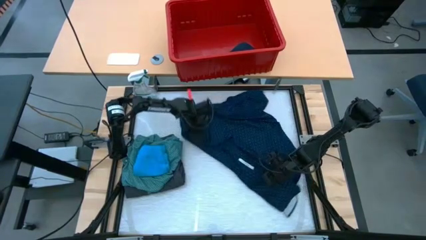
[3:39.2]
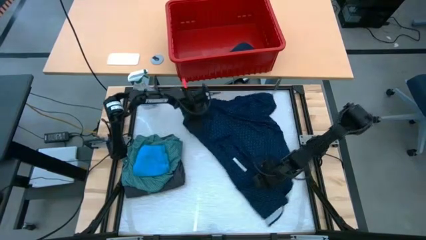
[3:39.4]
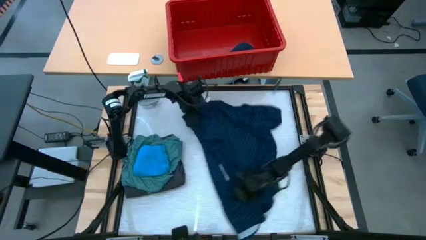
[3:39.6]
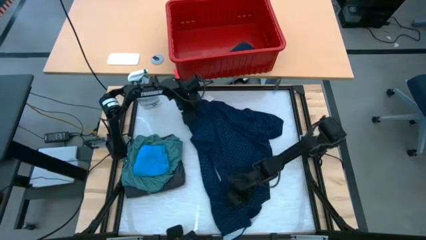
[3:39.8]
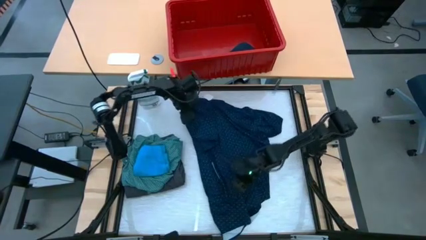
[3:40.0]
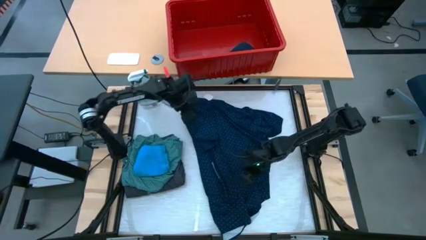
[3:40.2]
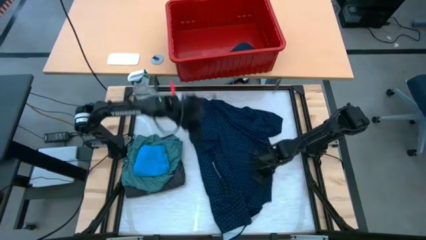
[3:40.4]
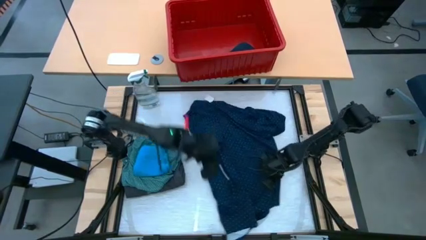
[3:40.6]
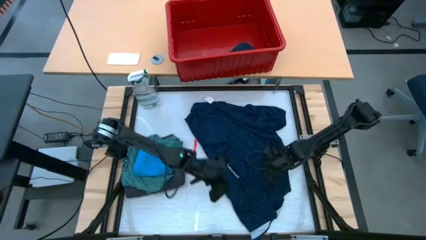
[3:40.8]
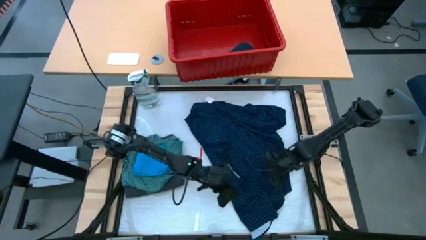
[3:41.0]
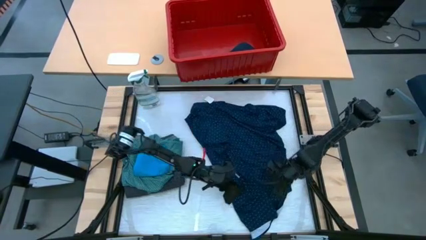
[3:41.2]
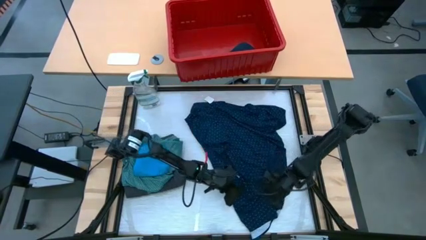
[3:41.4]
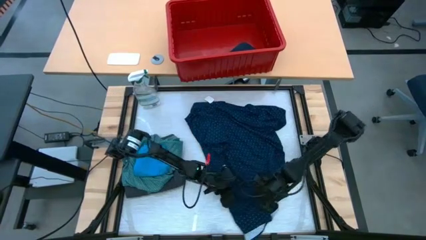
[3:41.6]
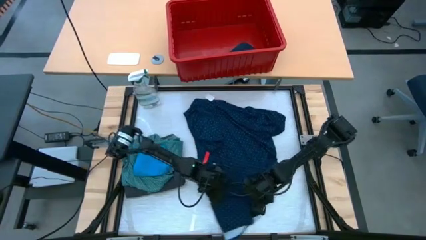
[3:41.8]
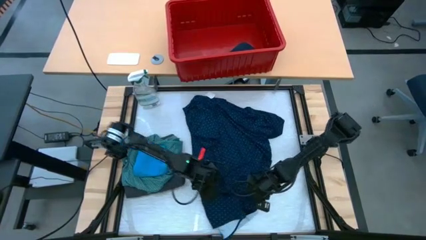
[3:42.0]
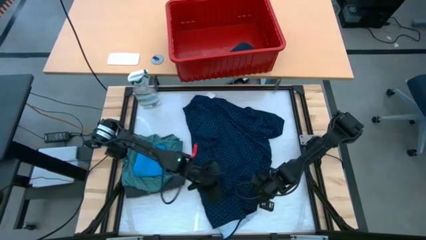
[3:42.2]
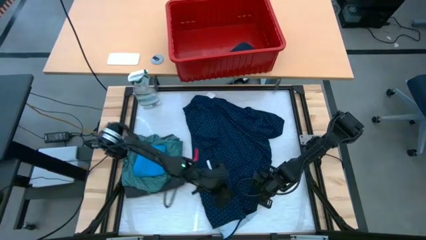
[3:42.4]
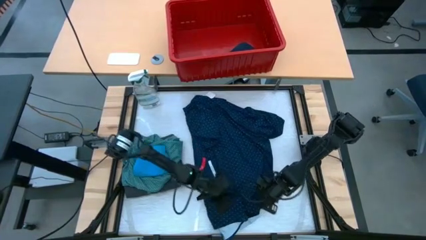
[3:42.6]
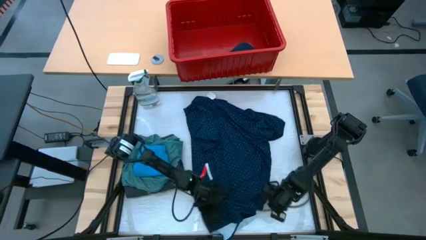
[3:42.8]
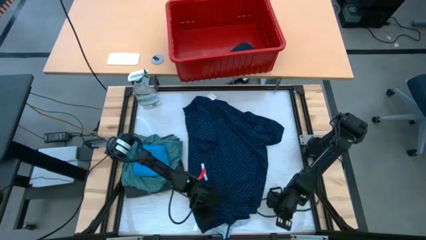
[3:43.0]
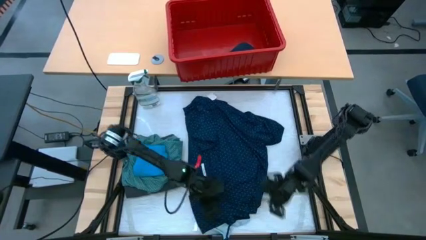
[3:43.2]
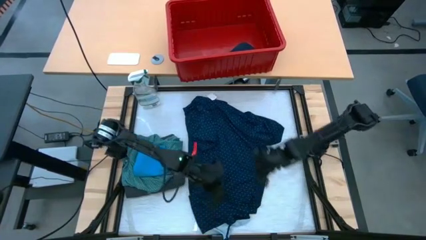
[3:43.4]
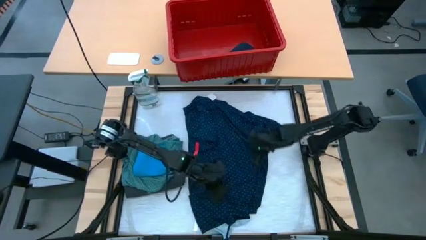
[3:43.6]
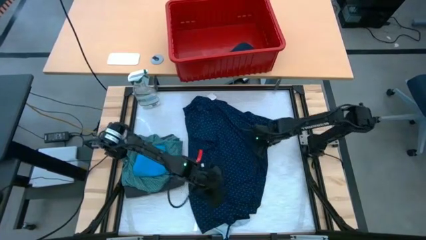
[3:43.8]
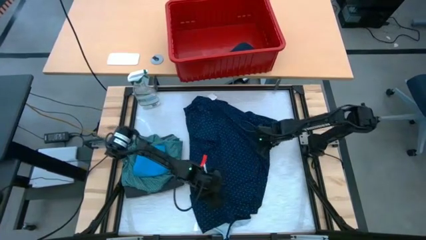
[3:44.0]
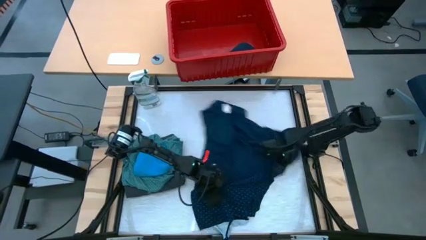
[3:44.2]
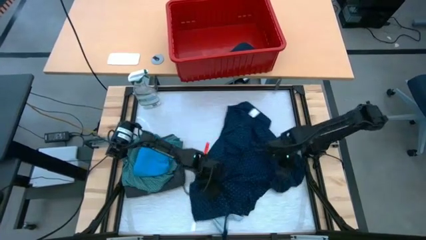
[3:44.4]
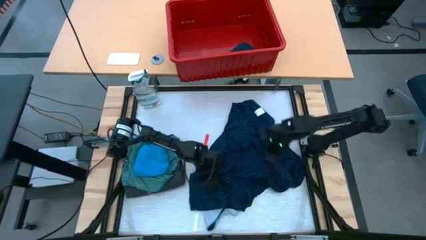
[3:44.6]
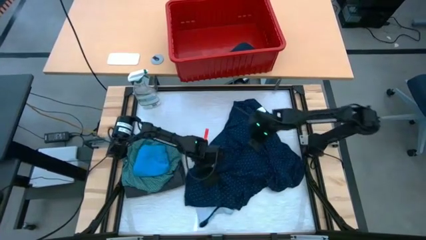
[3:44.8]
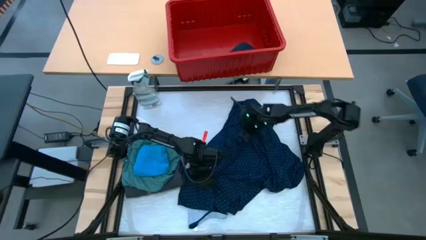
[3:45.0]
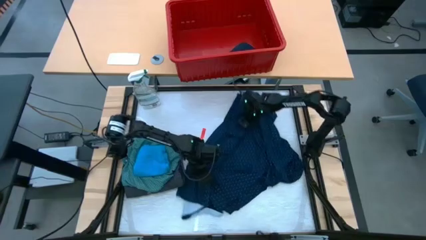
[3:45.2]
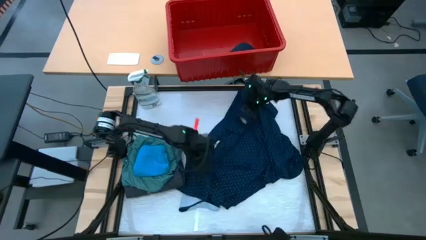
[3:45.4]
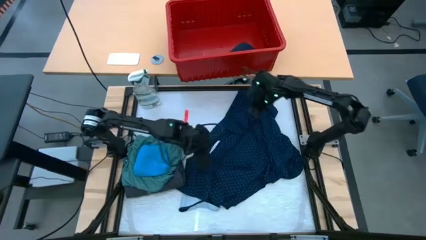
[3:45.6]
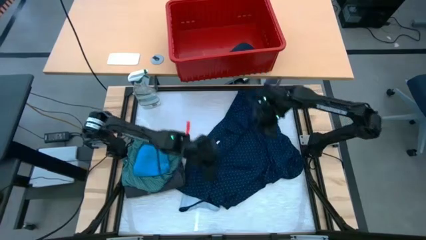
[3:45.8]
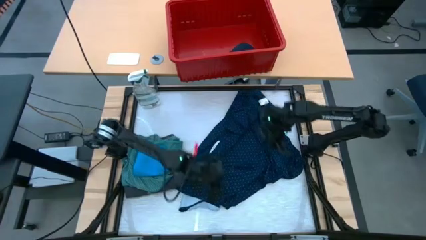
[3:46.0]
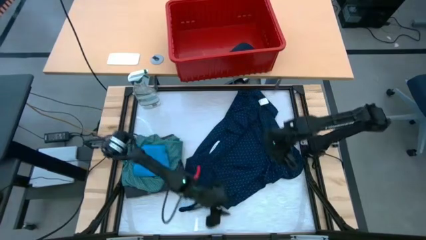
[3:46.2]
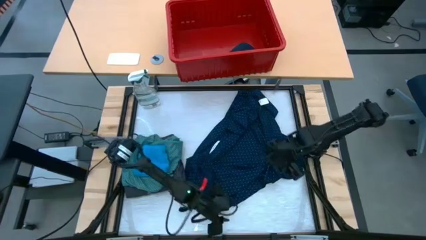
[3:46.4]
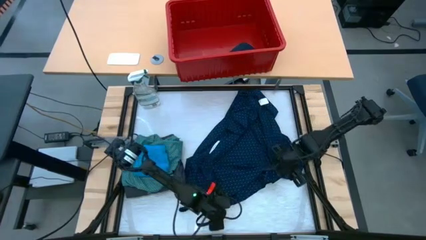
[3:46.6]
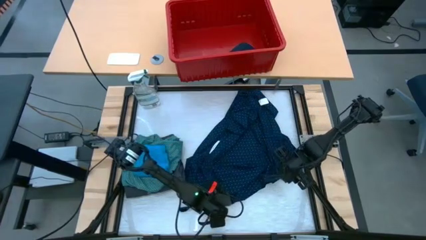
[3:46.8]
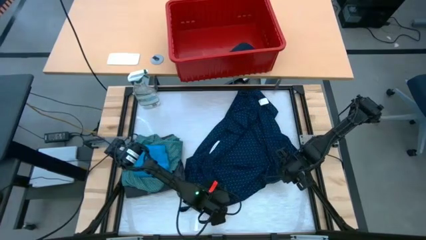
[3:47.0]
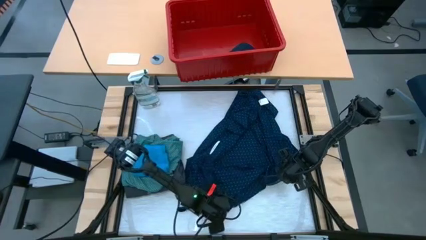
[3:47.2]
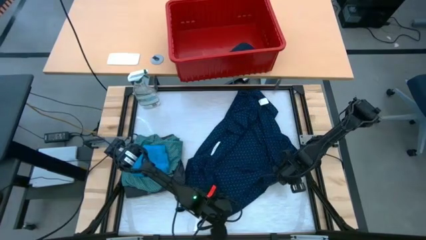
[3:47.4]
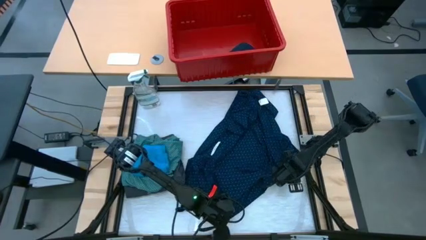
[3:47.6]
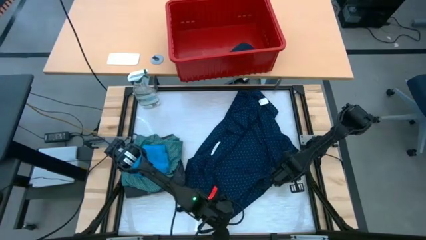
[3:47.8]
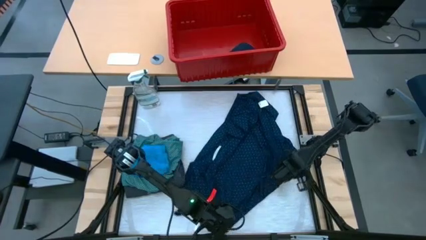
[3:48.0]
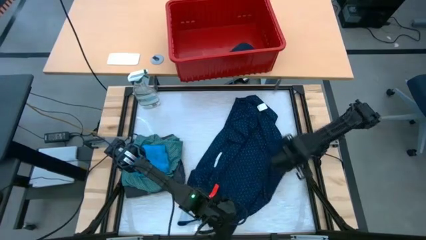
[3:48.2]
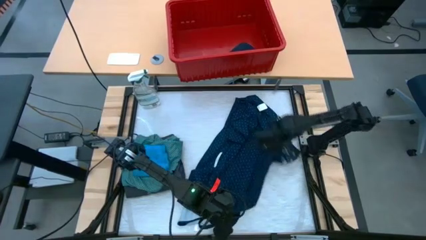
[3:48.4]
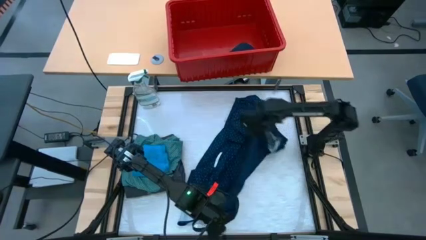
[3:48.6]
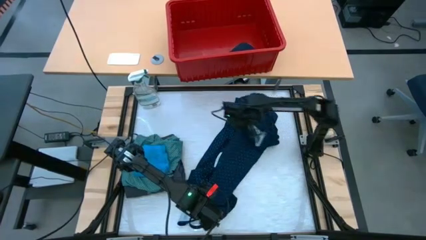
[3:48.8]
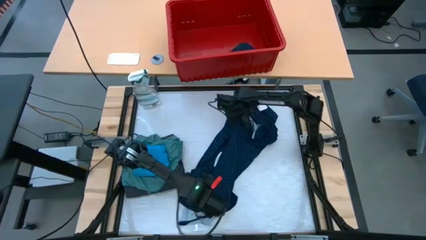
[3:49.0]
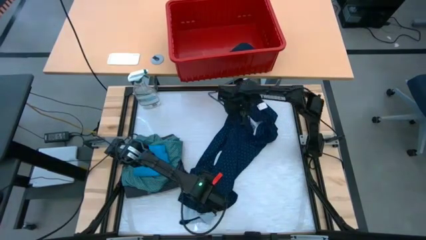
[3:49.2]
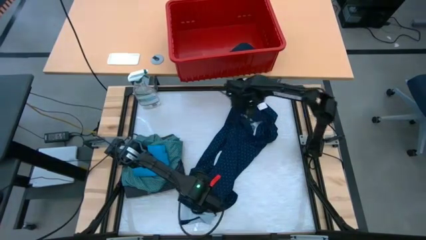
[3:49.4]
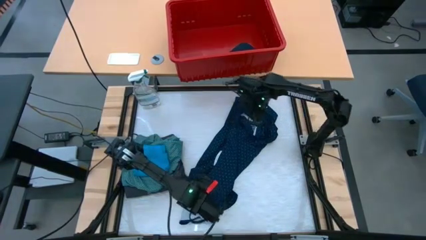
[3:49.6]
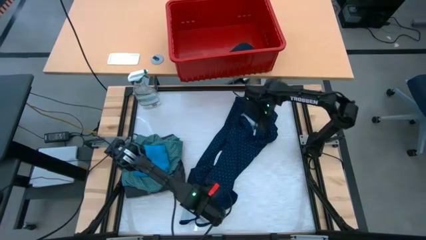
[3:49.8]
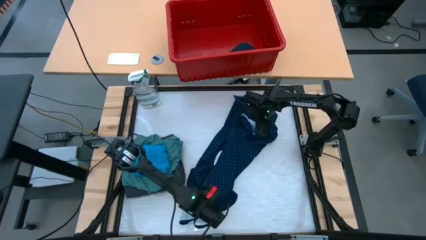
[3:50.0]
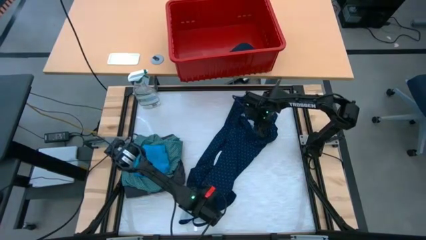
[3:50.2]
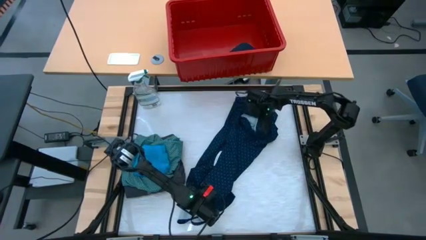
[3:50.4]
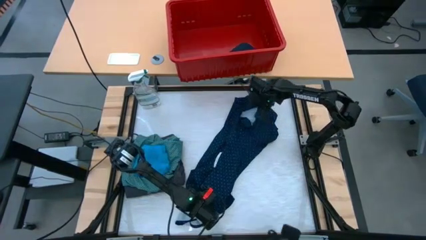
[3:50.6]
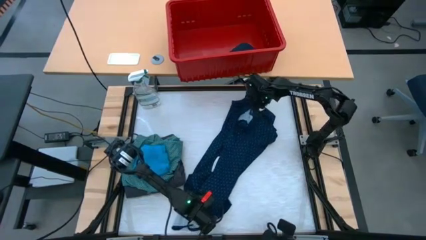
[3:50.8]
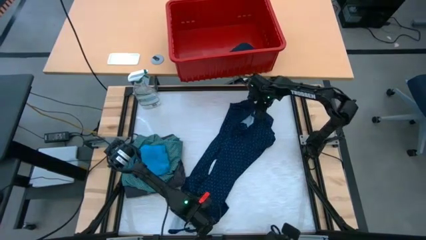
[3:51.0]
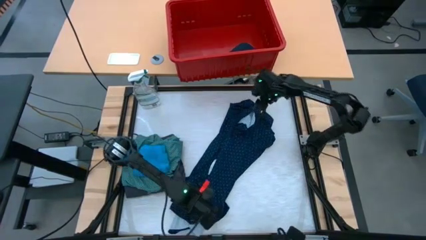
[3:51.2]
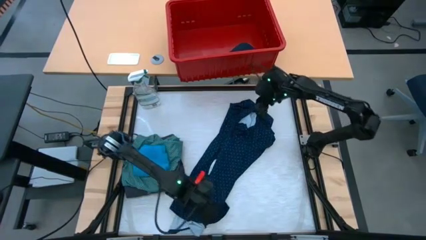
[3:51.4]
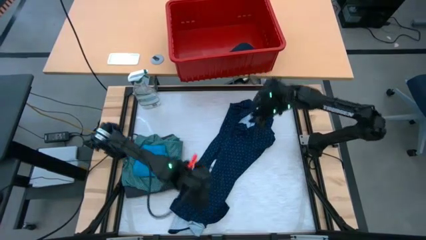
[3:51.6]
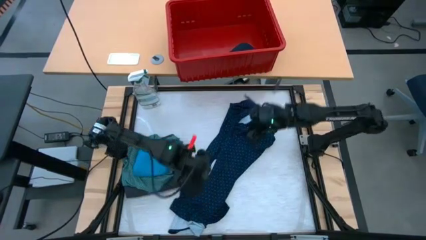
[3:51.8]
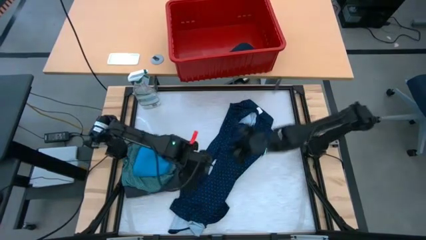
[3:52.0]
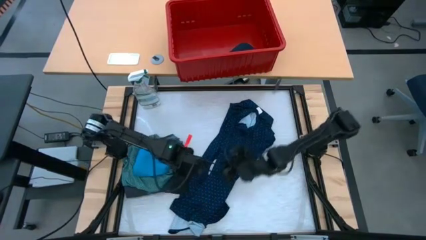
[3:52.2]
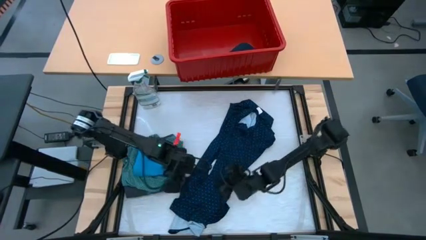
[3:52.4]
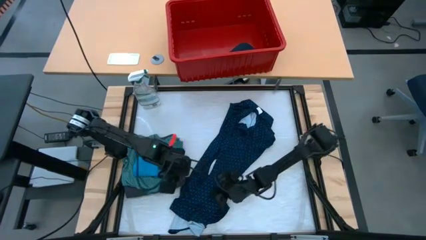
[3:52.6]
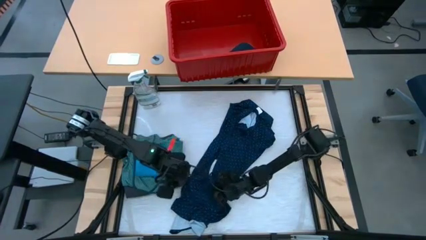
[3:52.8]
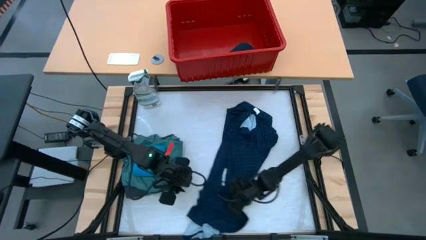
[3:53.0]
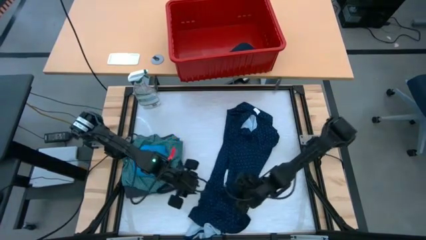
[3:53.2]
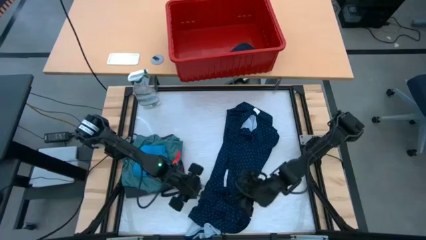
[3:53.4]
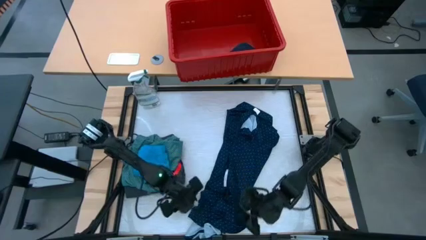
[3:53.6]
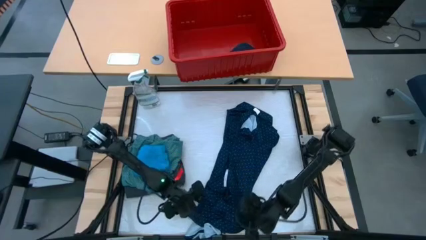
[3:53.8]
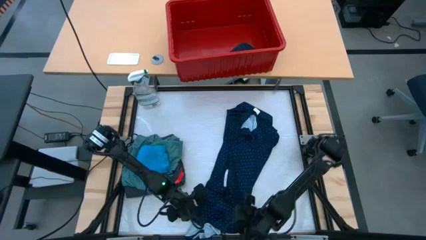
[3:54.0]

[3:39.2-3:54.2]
Task: Fold laundry
Fold the blue shirt
